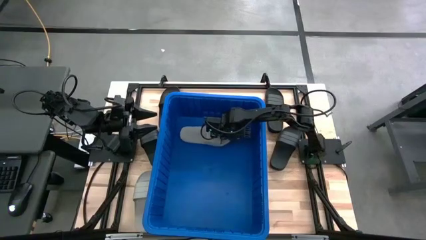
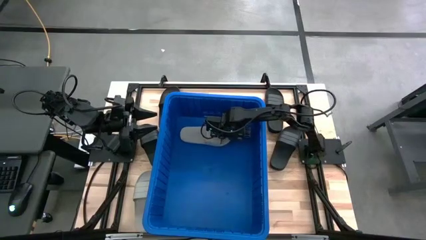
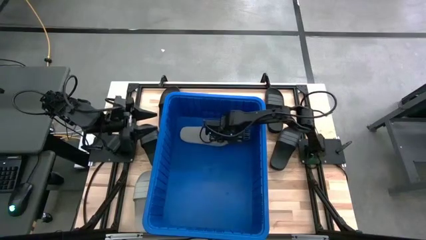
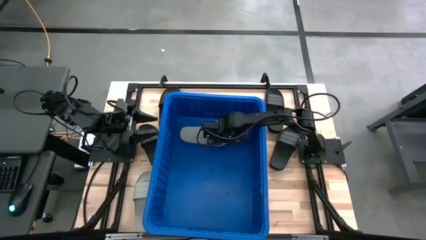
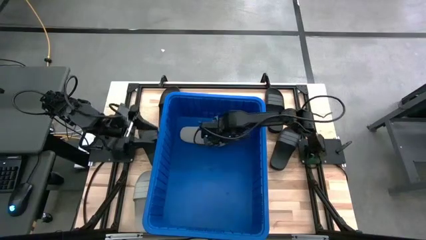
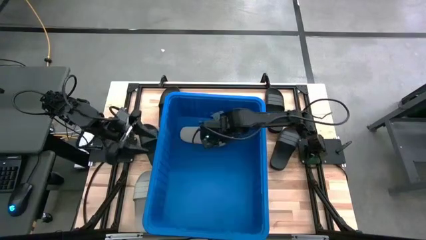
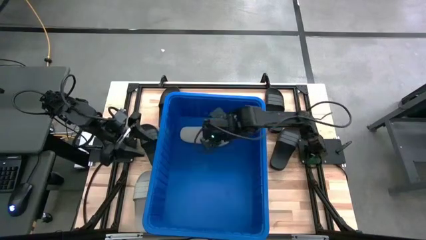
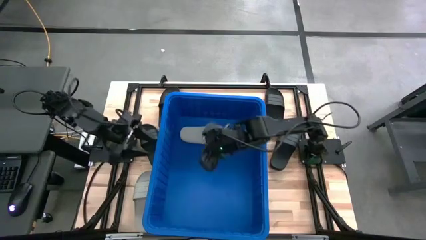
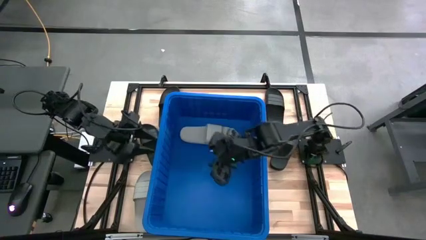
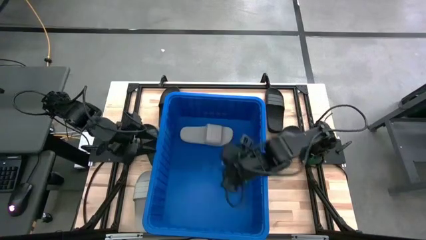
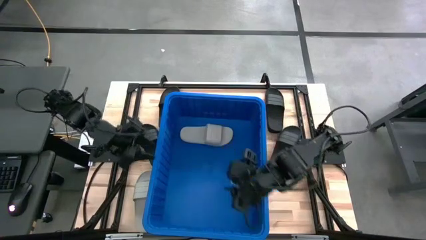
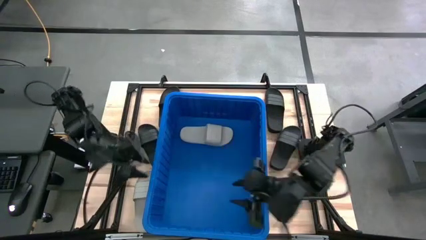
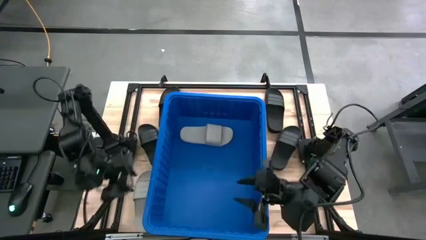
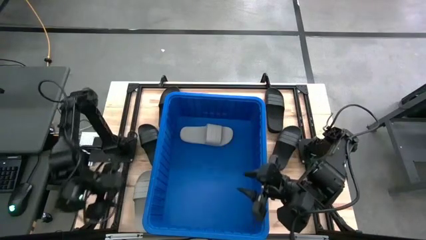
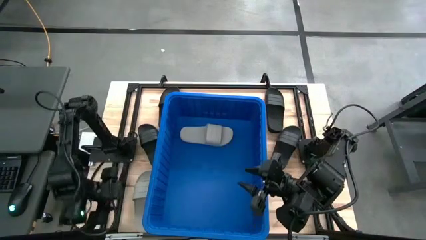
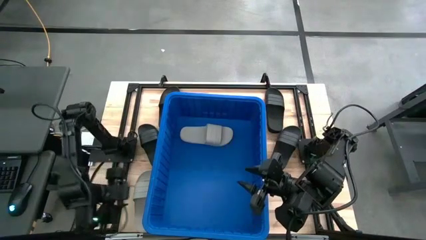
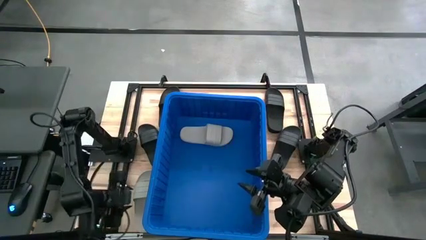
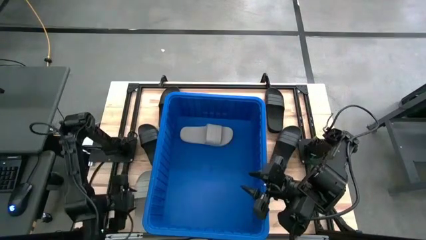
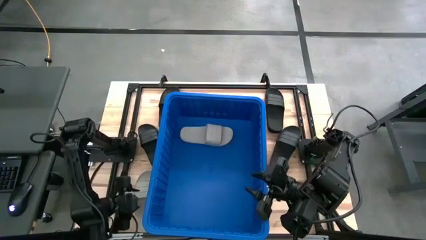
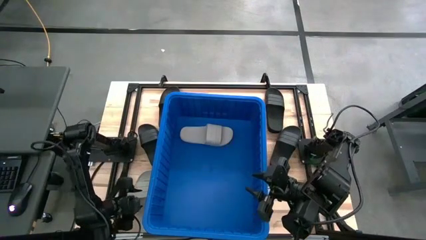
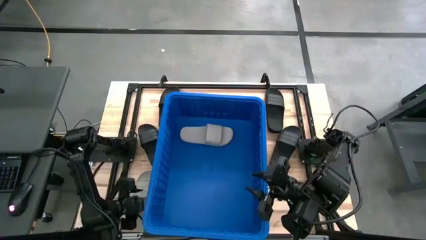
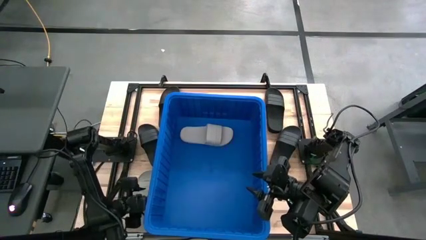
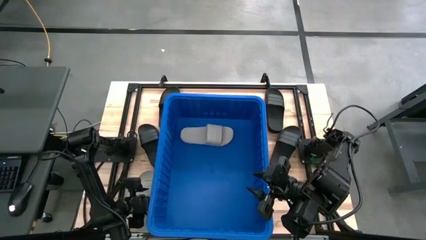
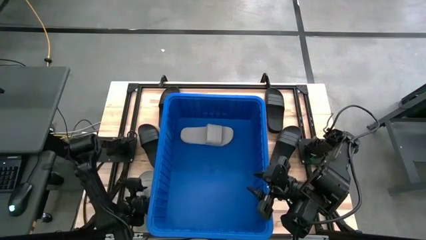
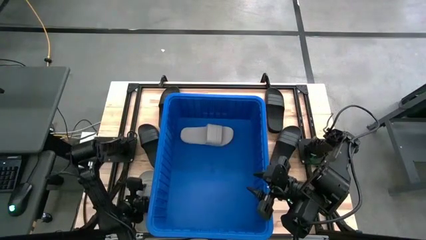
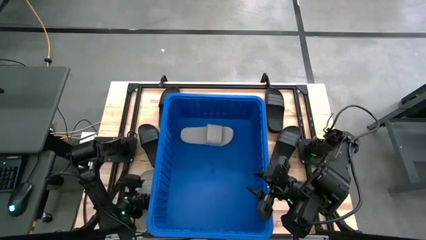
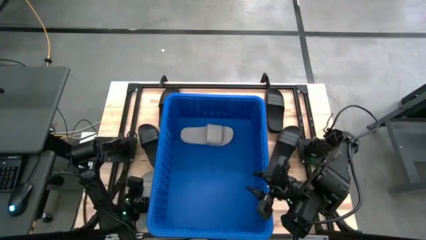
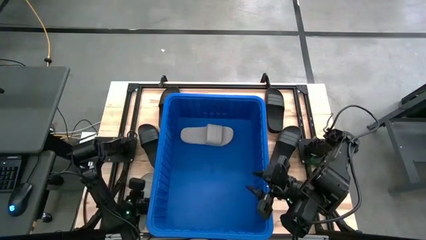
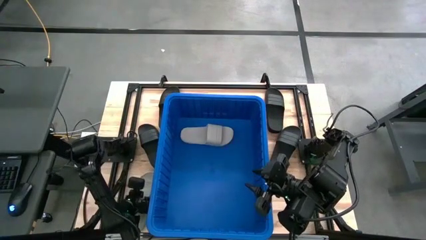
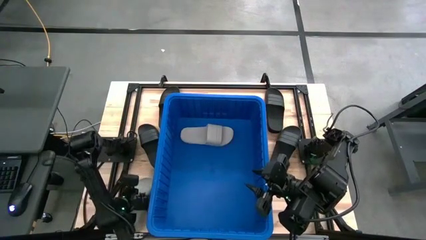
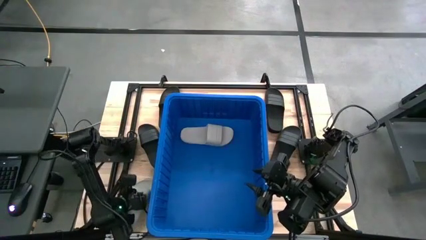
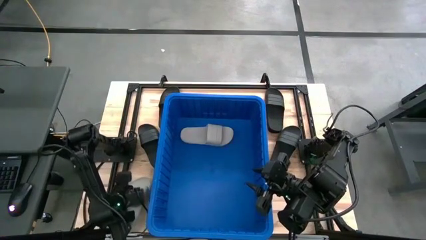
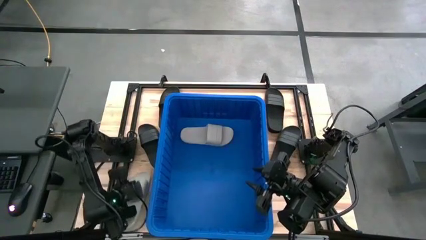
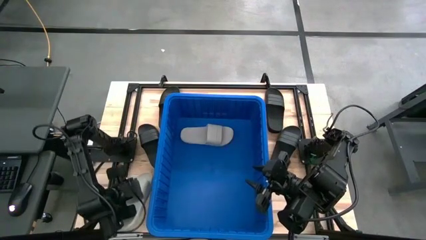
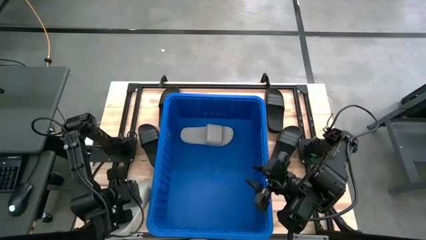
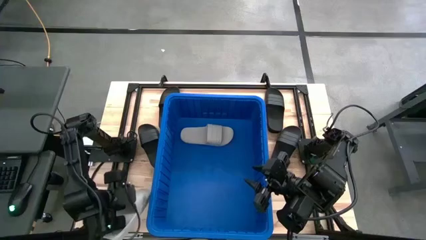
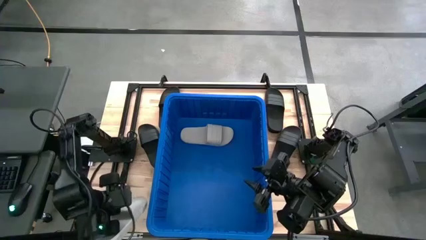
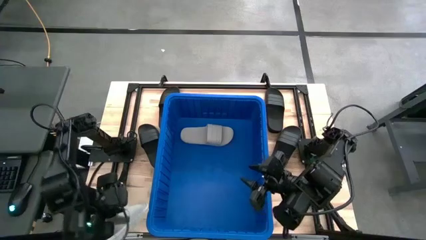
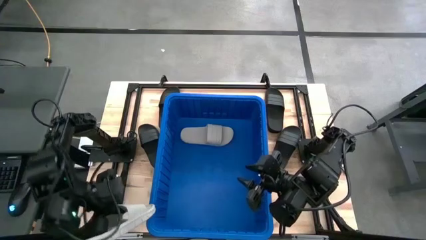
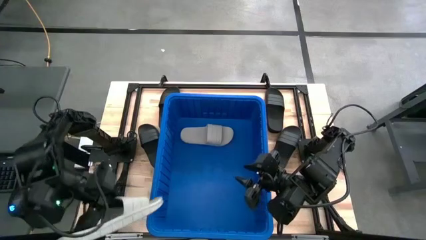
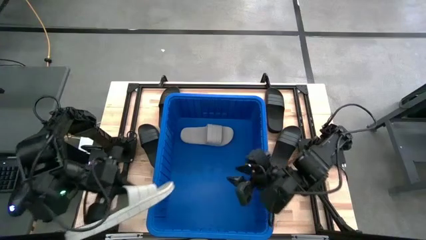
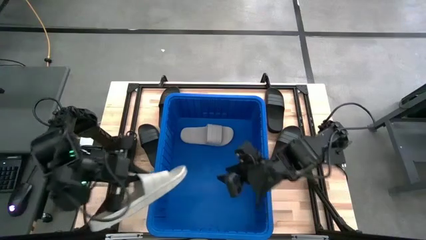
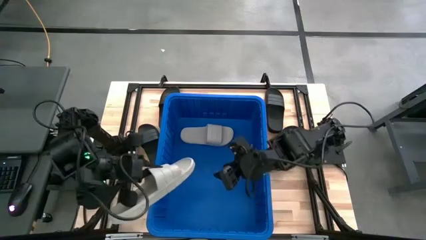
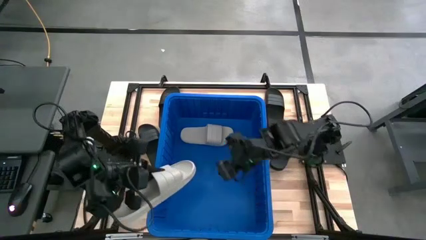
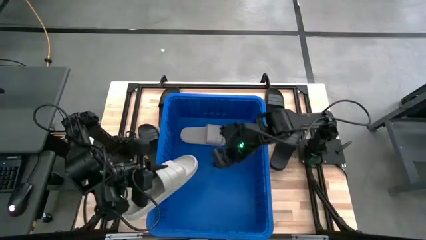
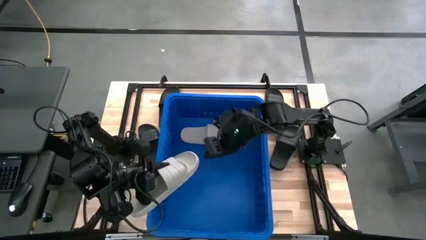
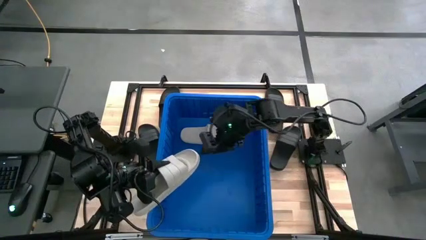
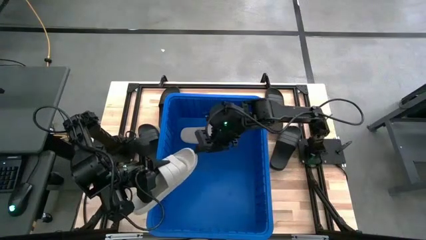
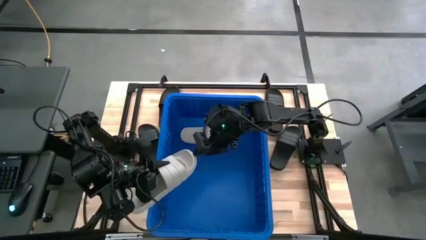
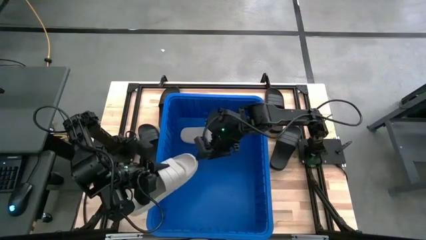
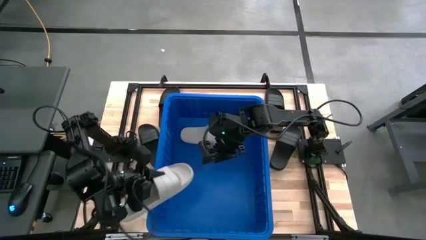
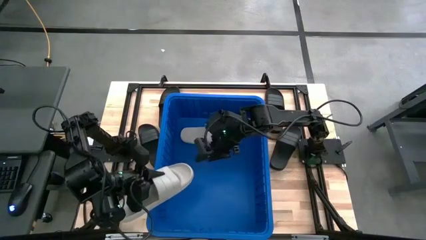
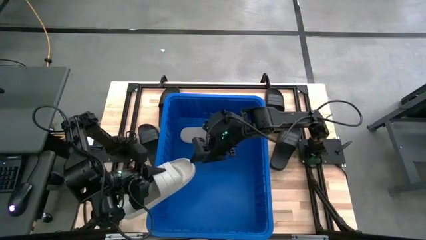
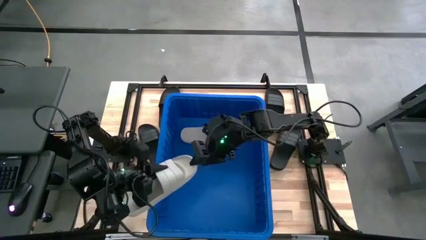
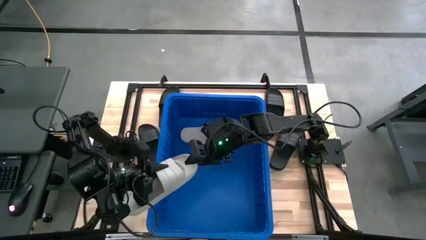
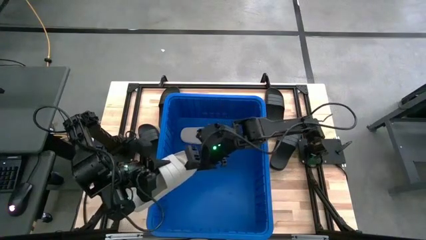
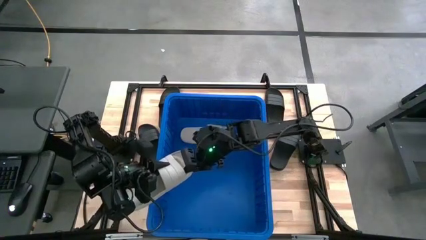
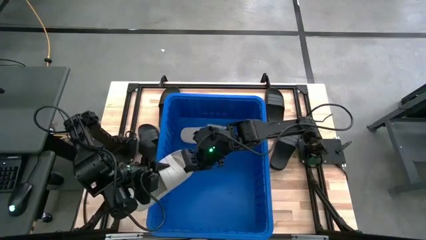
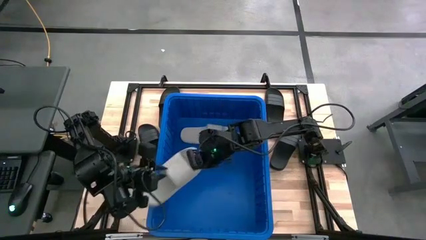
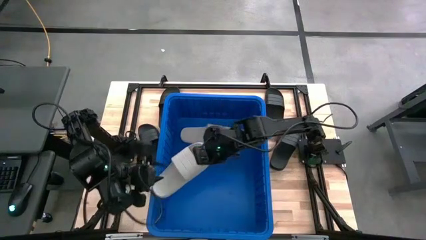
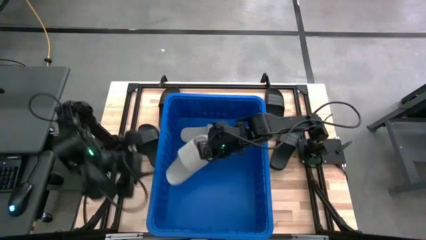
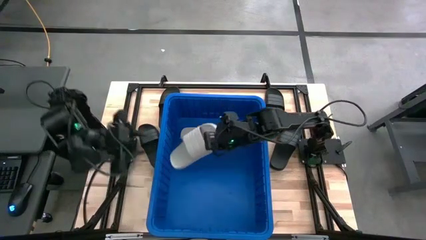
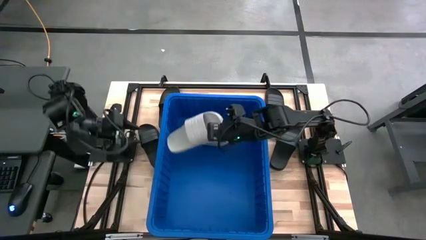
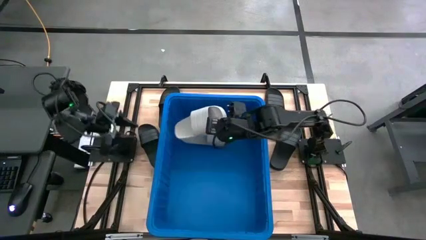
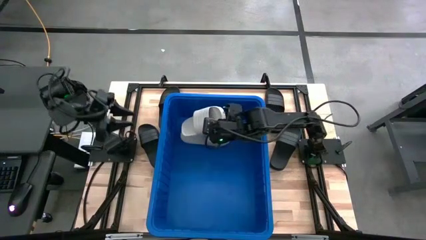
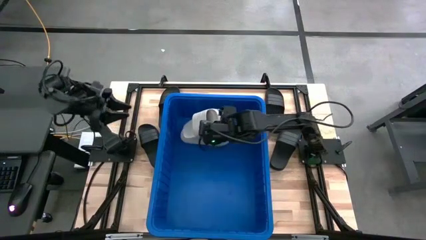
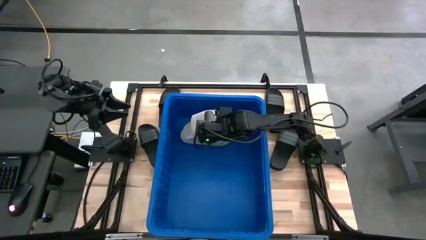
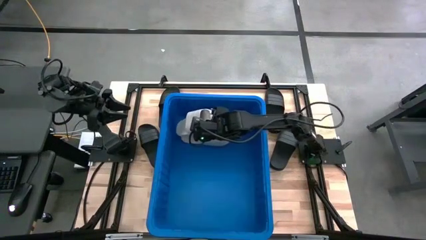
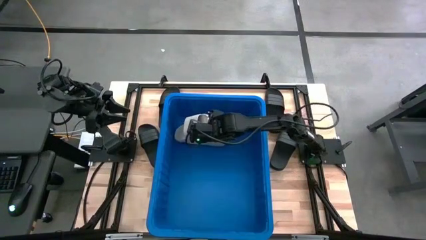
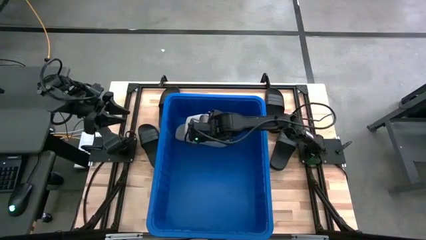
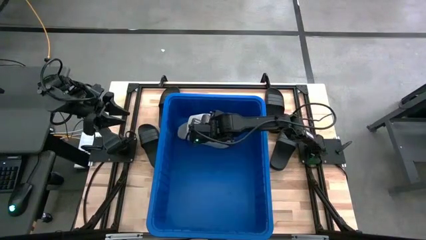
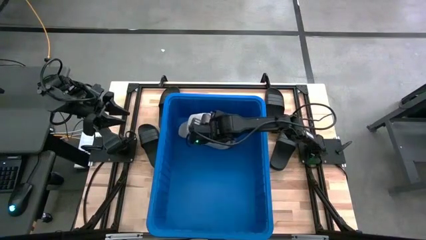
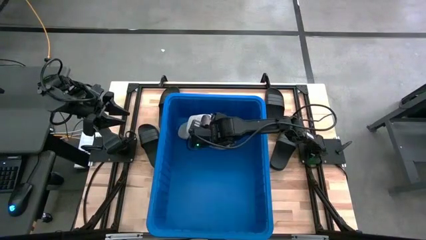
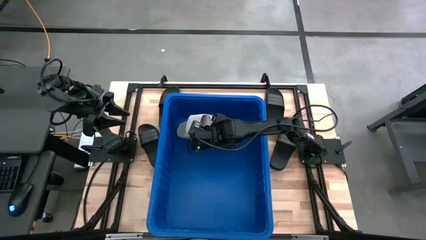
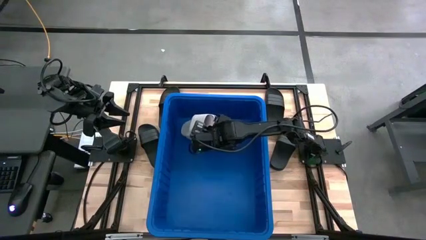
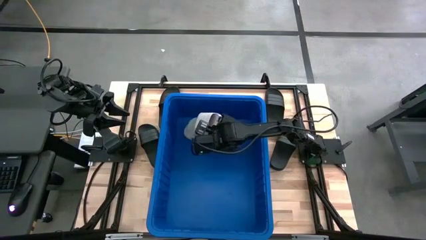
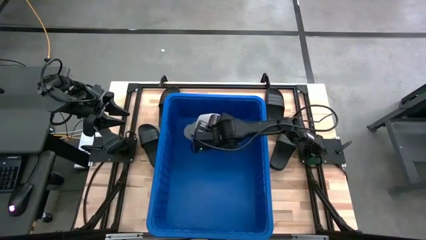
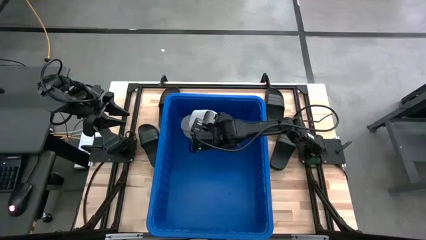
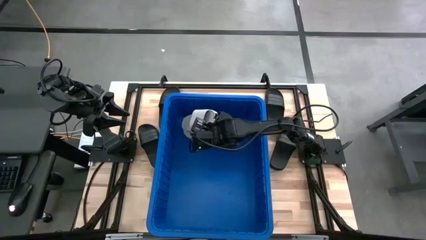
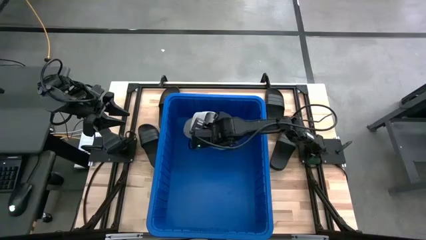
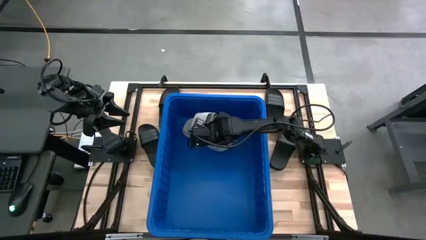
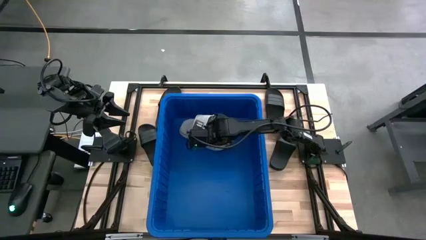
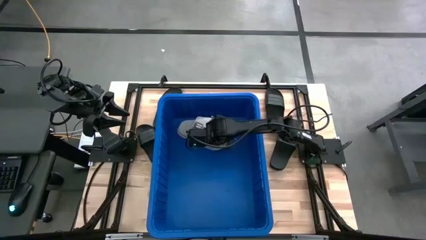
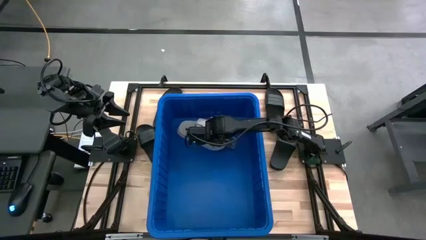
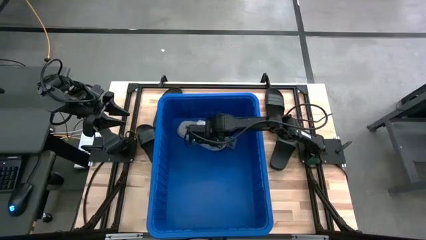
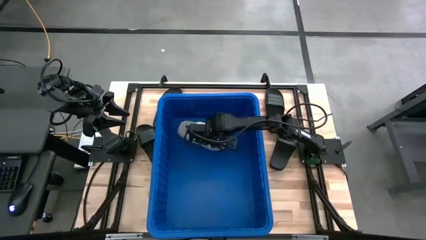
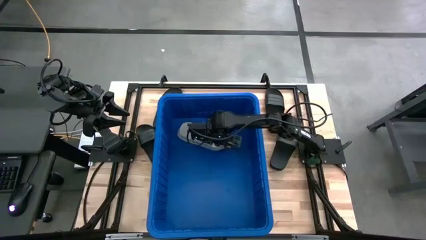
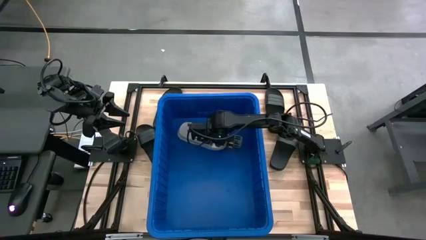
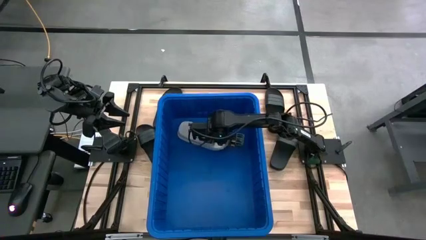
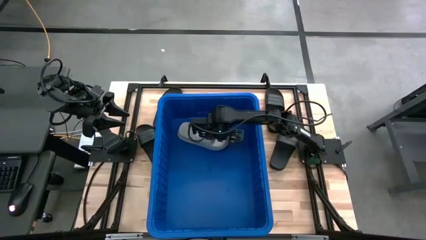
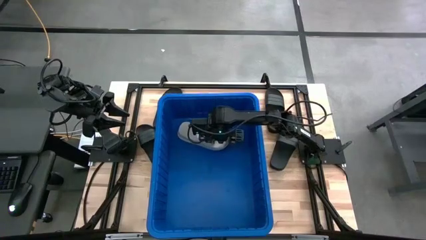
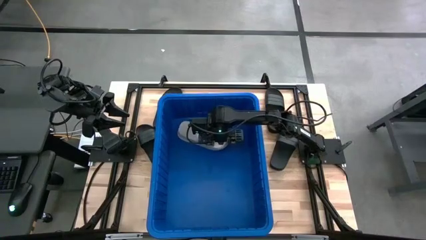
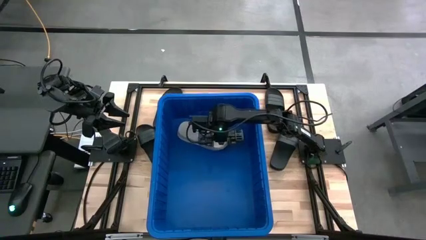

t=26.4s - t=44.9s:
Task: Pick and place slides into bin
Stack the gray slider on top of the gray slider in the blue bin
